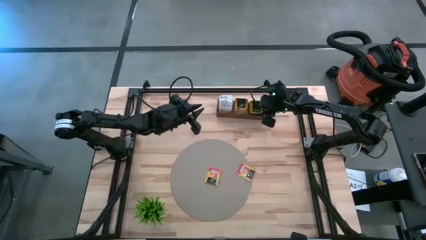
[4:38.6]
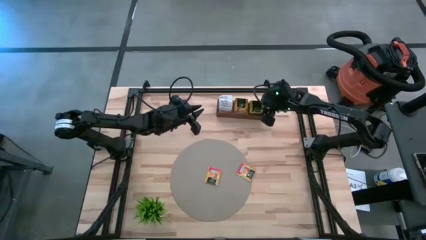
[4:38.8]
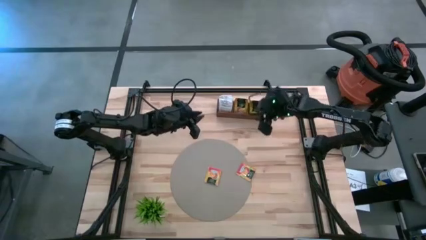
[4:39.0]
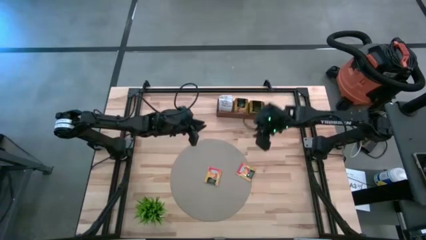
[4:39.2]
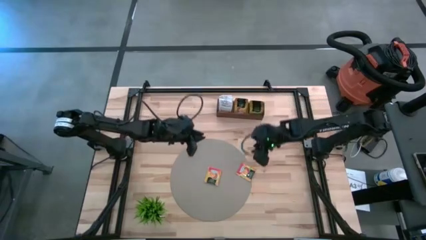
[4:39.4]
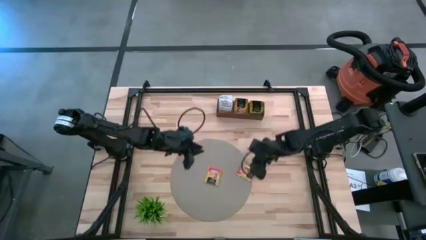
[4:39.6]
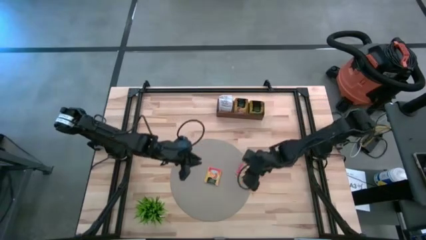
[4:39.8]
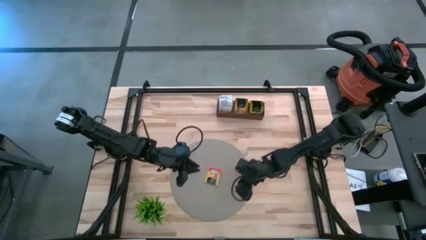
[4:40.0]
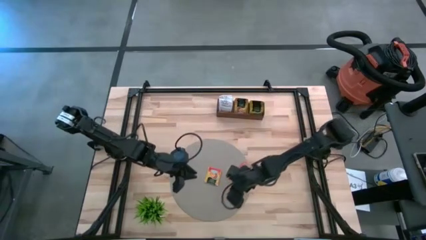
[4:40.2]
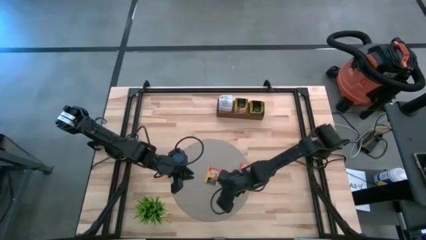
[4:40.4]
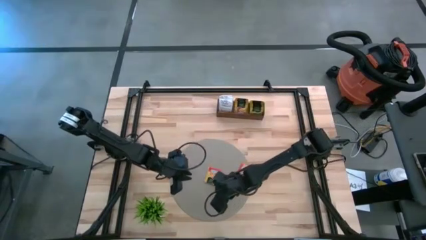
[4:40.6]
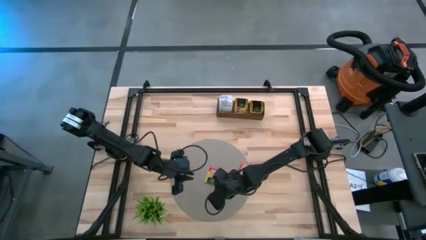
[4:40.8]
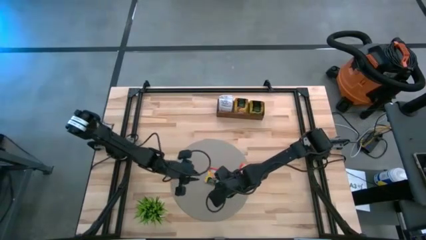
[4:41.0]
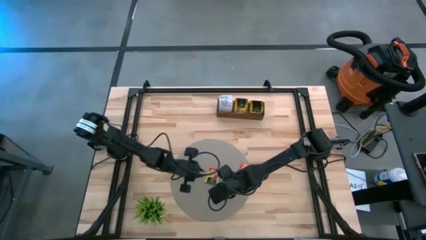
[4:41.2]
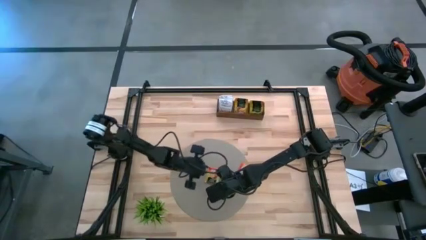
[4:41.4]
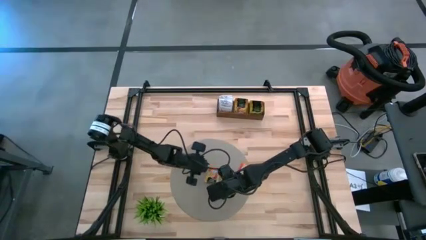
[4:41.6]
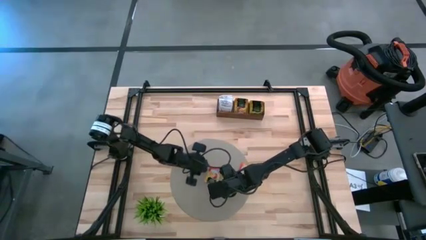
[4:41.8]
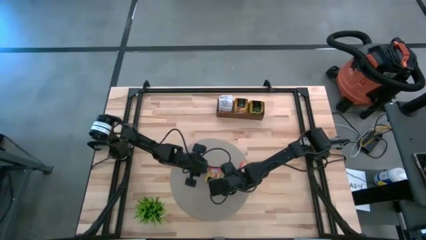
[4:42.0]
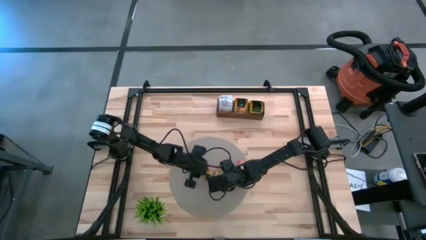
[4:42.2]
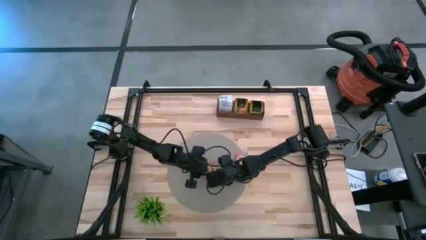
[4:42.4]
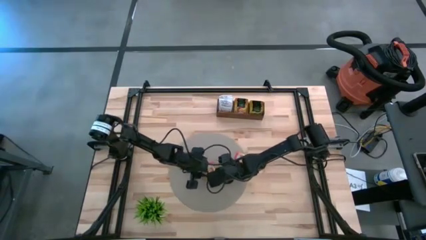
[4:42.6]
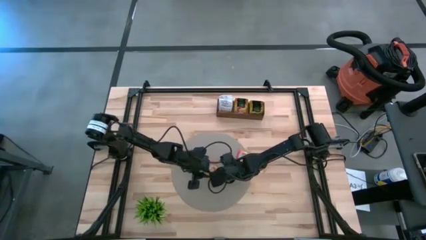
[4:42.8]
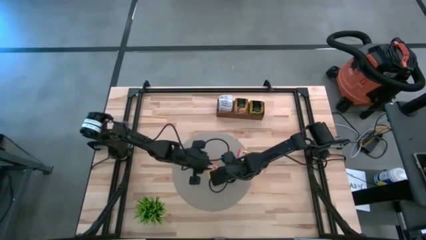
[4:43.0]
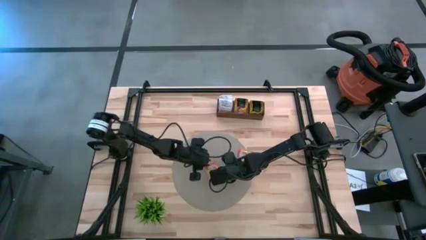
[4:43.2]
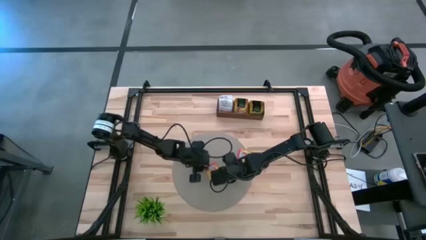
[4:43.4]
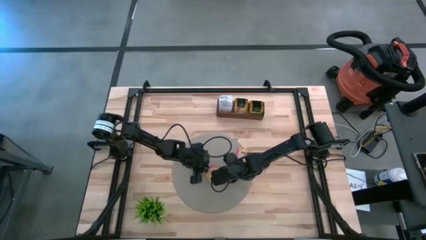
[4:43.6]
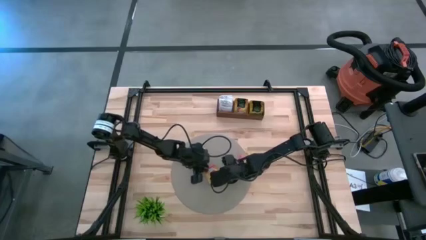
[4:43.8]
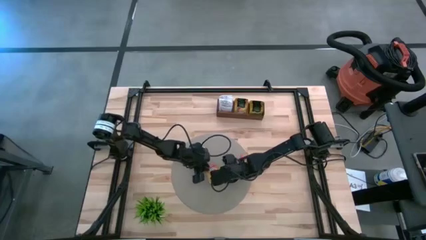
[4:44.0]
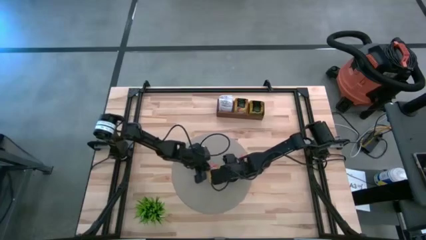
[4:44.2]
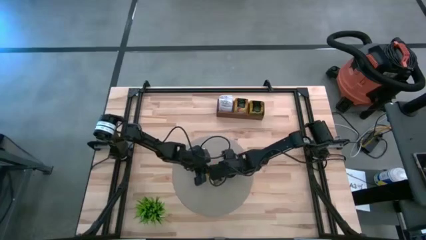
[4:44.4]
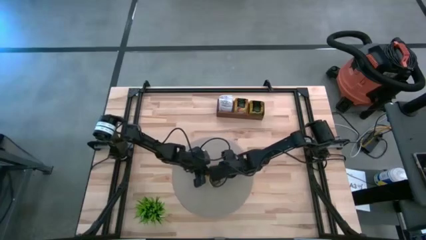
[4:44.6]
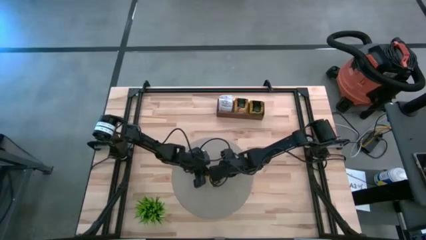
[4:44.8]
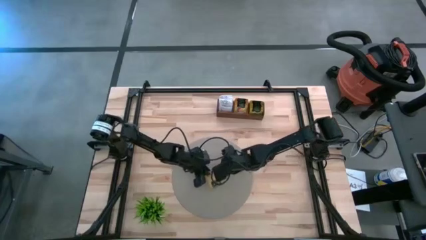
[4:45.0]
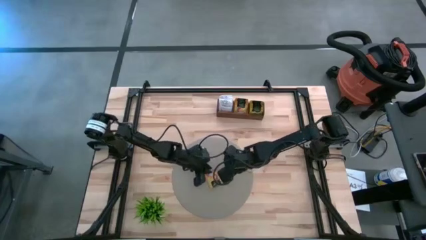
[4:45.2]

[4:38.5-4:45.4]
Task: Pick & Place Tea
Put the orange tea bag into the middle section of the wooden organizer
